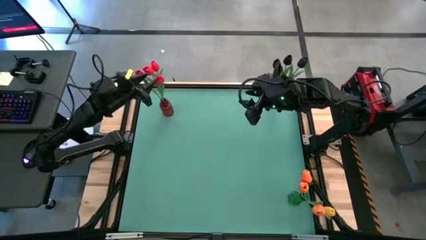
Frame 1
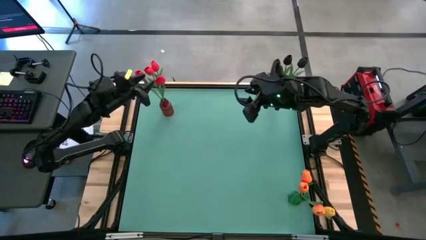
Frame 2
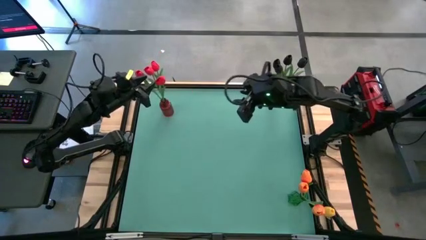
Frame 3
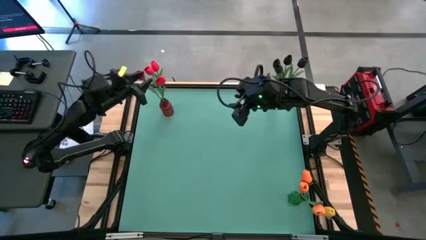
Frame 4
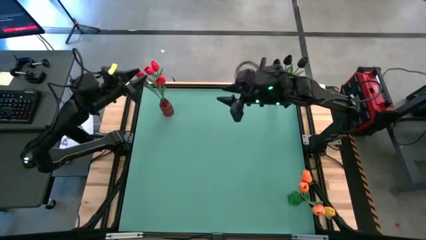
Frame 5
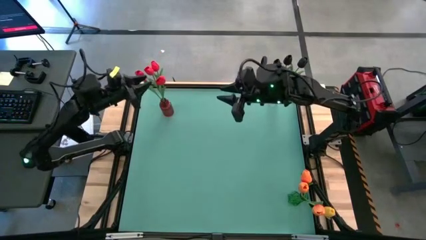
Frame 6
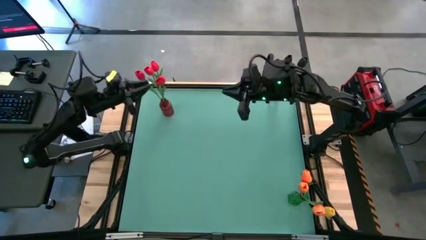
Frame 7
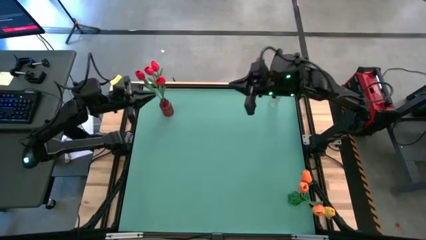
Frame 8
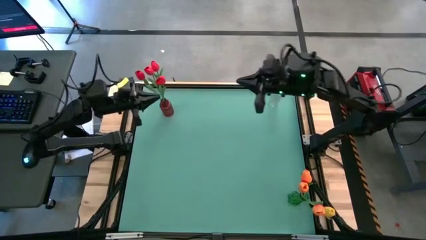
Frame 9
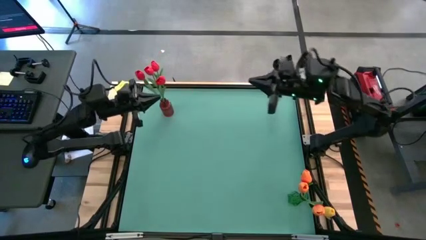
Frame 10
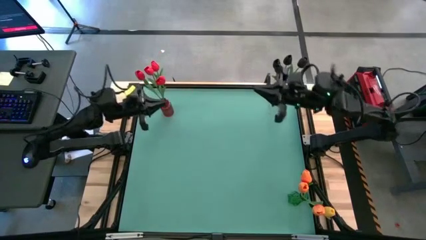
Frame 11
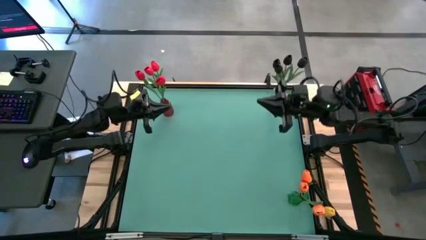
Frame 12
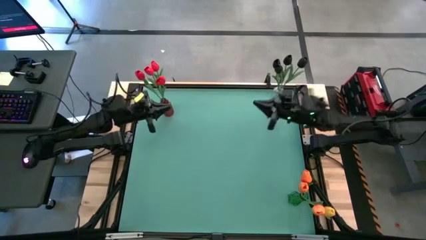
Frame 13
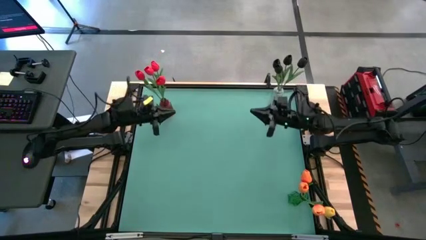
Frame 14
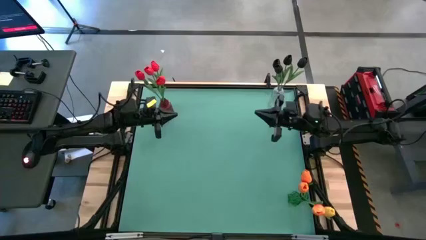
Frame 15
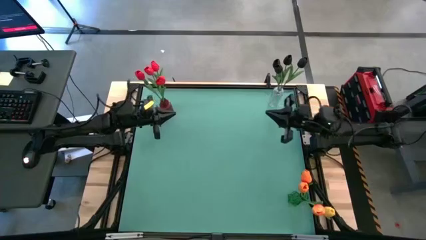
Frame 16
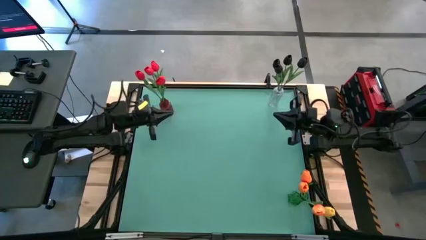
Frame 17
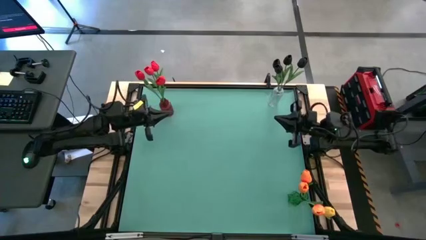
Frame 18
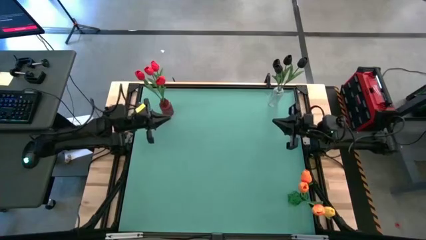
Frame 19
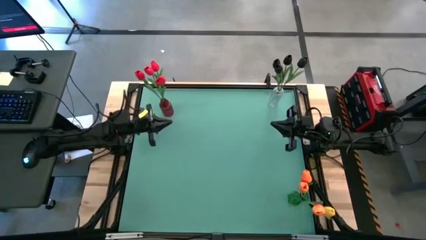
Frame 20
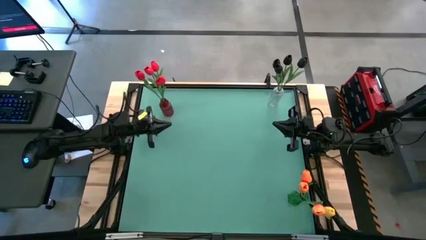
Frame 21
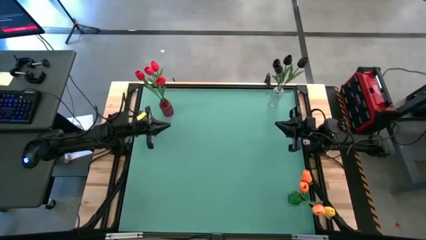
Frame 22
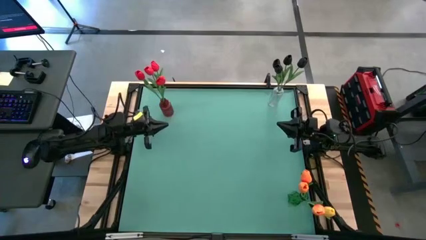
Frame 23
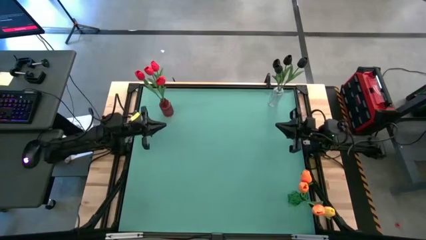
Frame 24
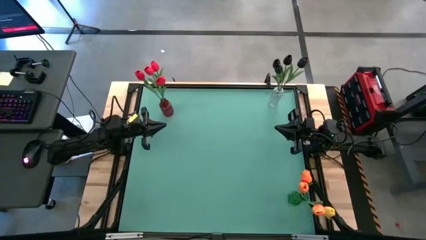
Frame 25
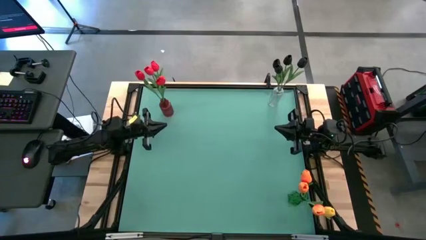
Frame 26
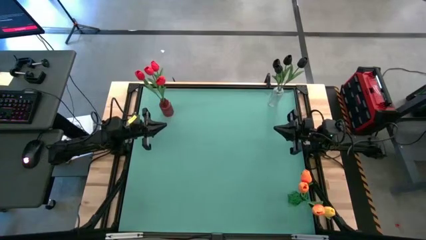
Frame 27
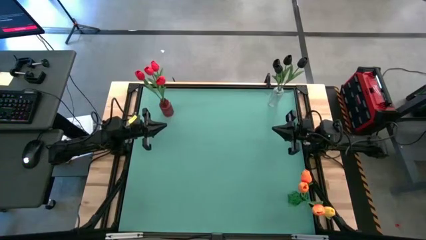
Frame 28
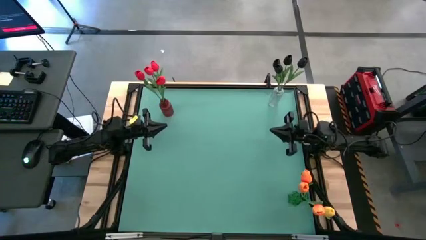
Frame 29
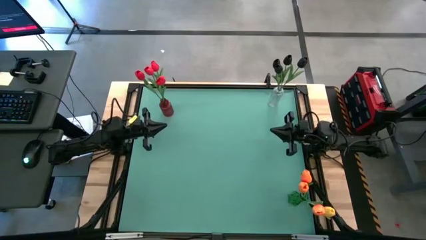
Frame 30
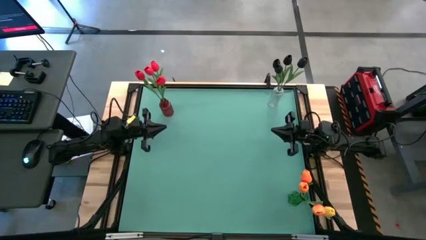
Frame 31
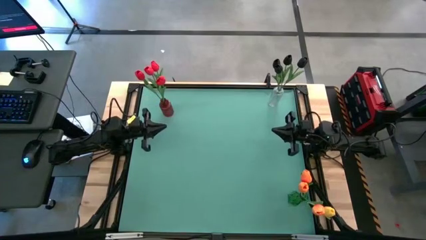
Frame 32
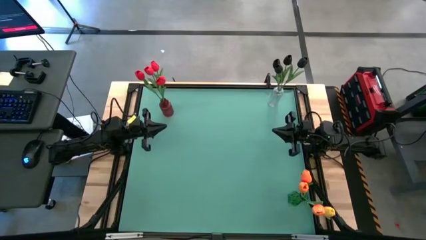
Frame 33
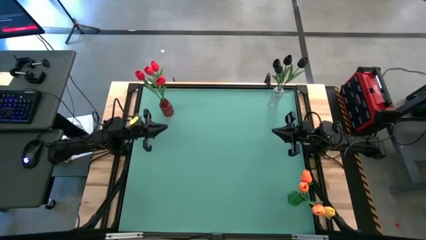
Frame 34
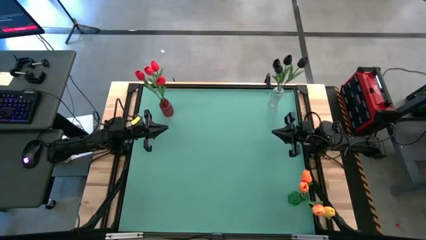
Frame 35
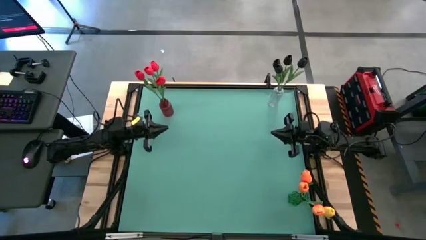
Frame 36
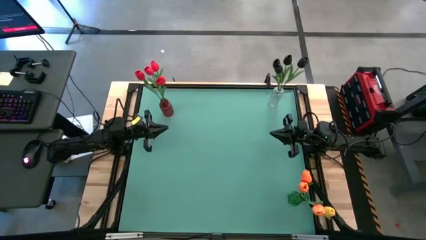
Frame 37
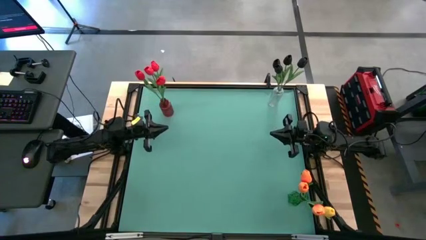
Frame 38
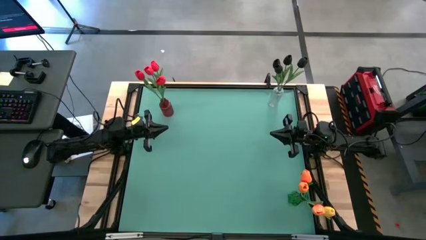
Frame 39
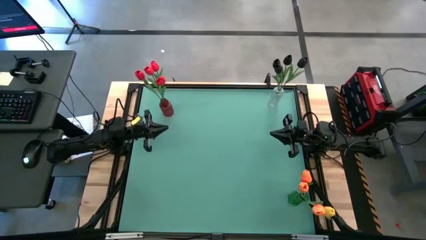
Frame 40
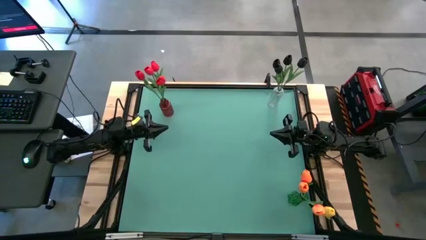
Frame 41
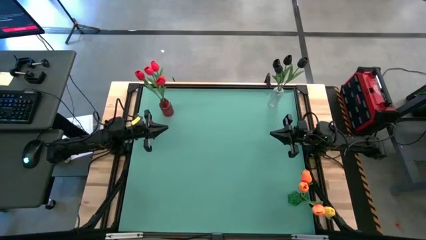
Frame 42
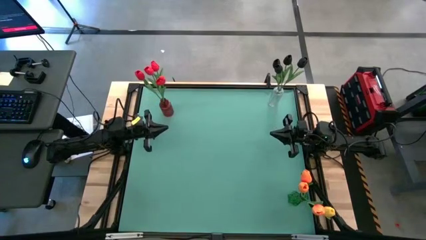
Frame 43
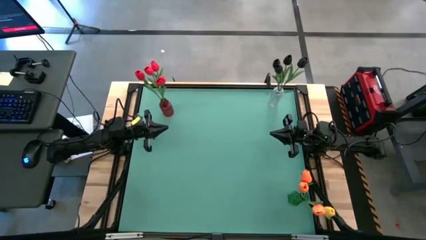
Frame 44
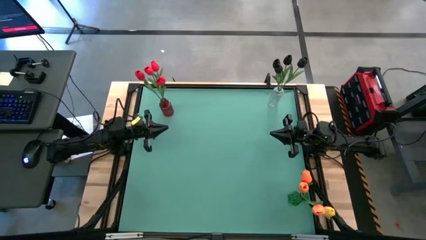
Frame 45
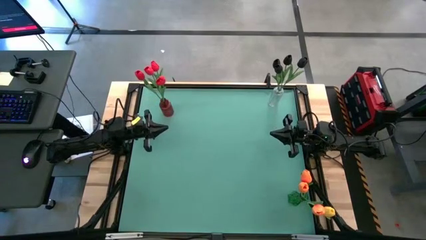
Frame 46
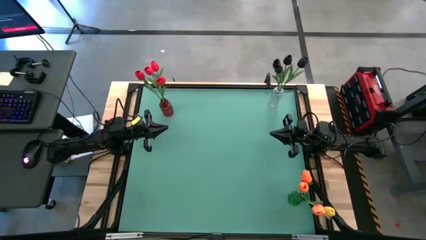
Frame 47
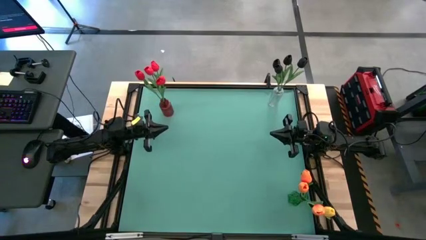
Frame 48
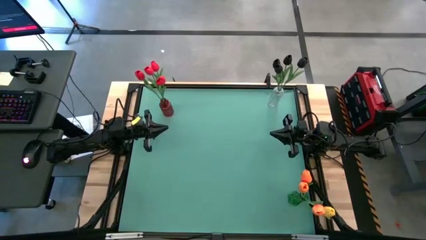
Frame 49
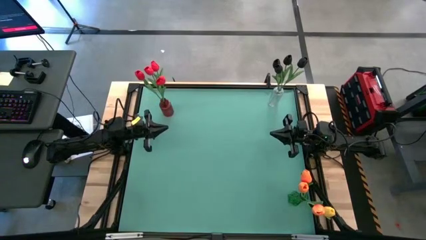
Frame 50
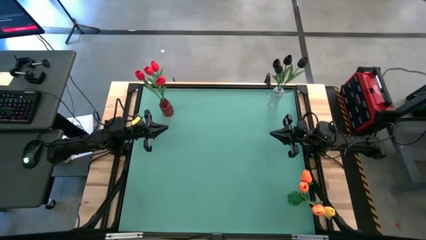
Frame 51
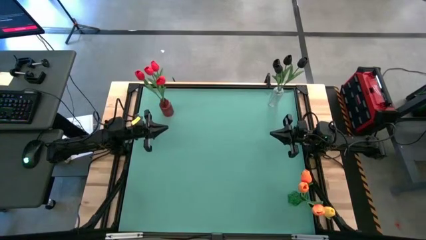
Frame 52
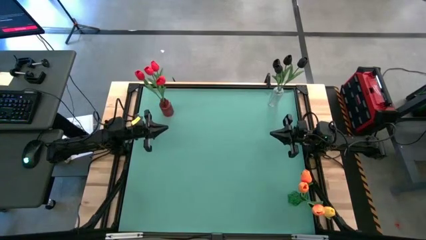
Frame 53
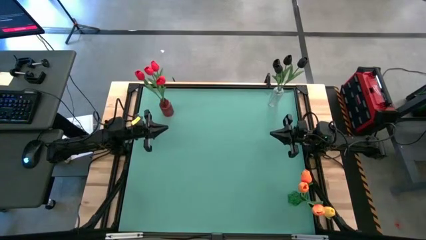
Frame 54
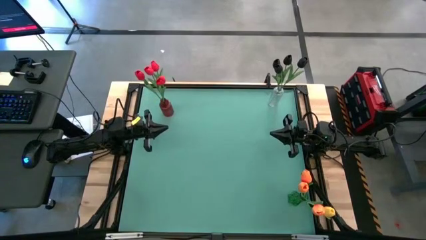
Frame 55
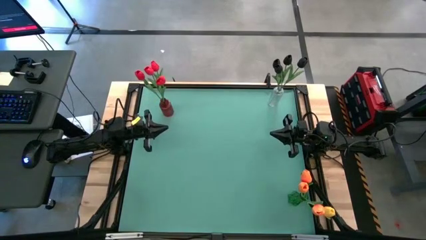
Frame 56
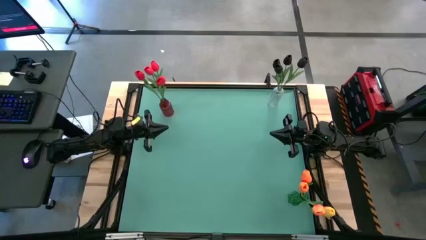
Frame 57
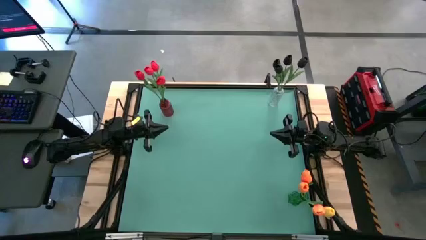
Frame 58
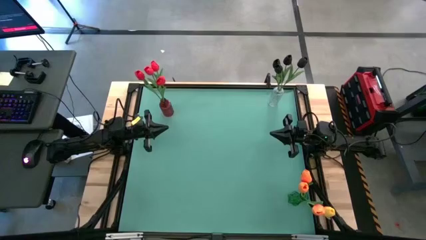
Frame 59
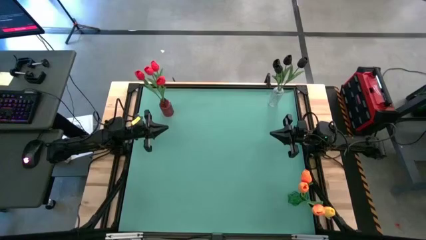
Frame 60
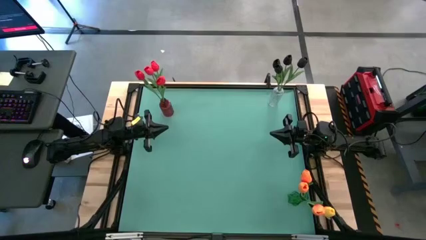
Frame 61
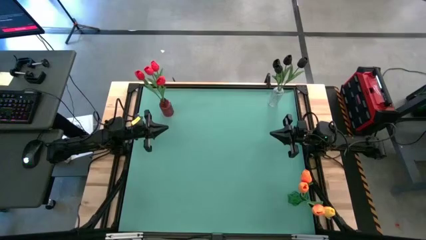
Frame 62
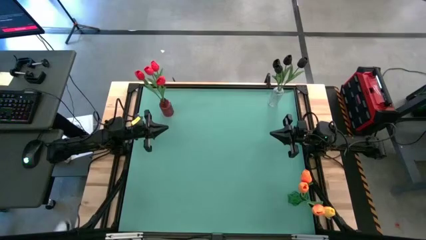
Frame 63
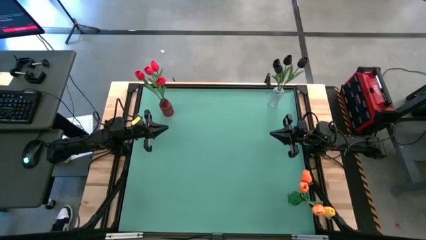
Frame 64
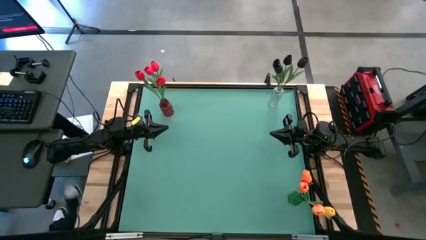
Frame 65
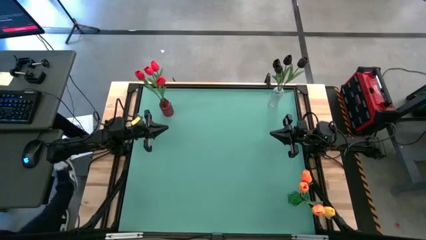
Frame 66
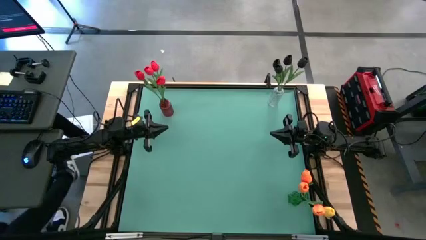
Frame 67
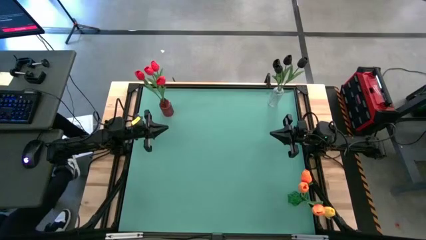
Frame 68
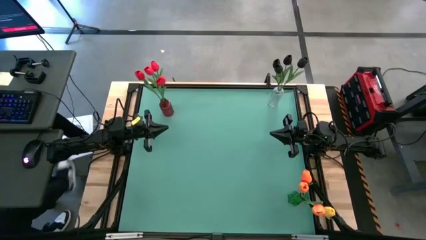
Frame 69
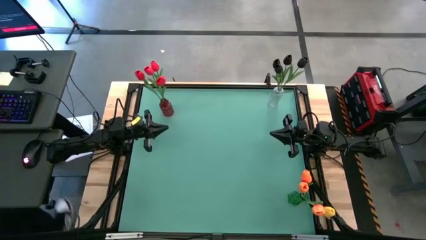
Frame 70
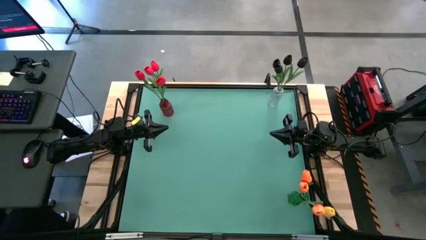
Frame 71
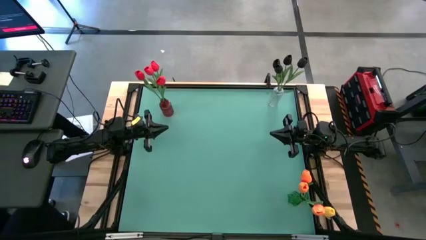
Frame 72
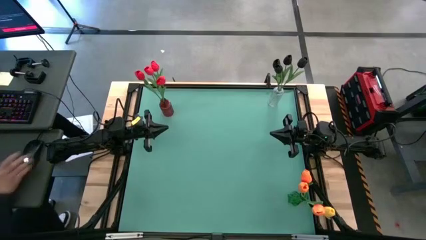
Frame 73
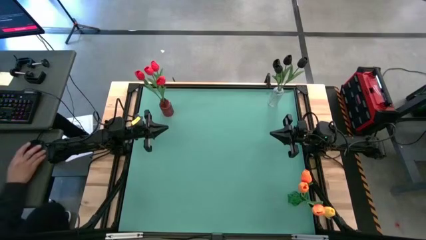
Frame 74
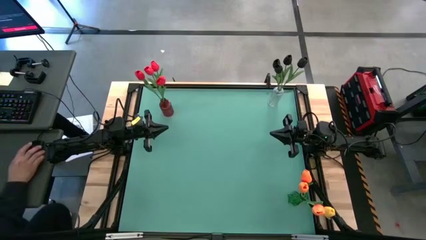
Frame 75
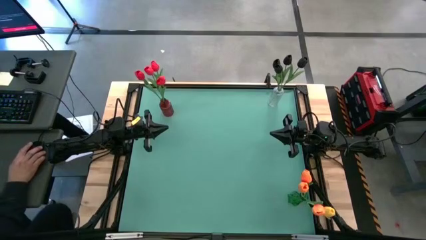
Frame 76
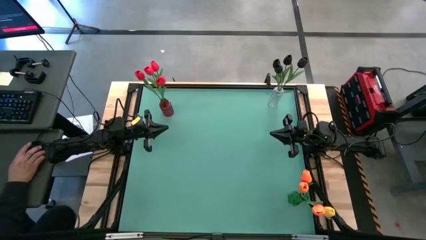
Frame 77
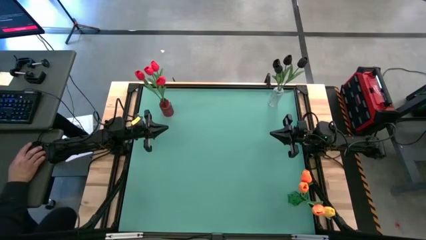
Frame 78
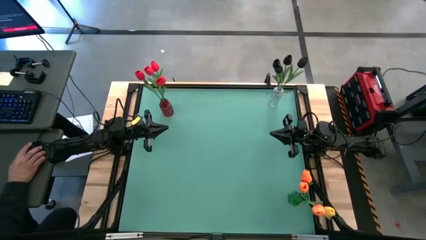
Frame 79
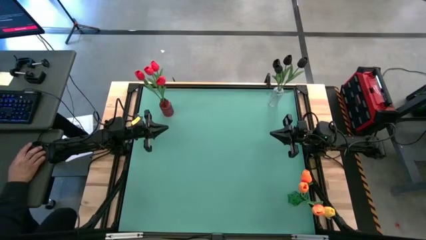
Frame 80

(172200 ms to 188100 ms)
Task: Sort flowers into vase by color
Return to Home Position
